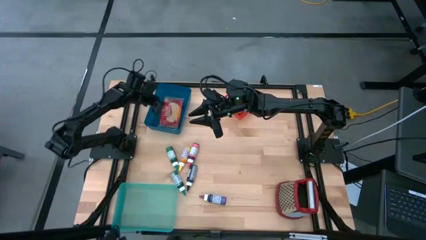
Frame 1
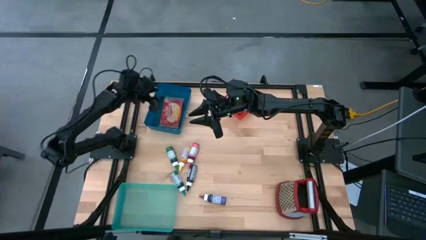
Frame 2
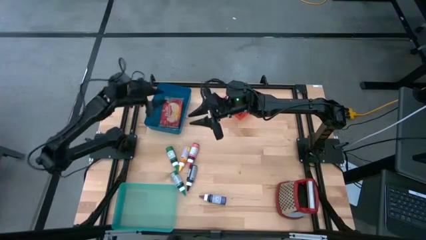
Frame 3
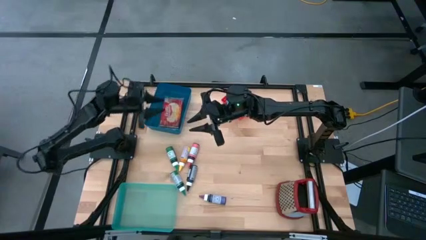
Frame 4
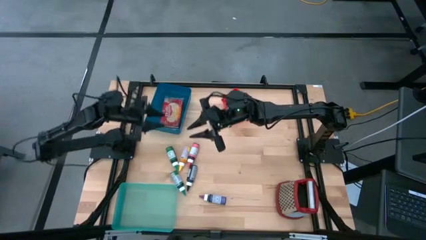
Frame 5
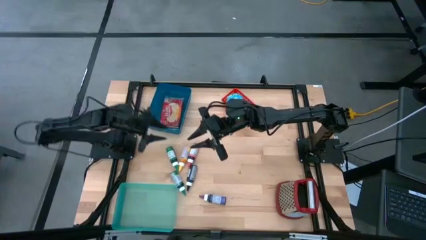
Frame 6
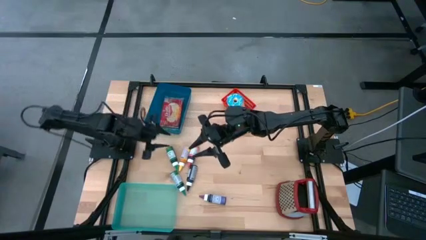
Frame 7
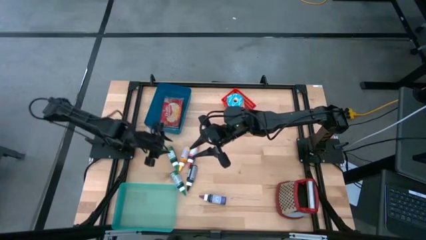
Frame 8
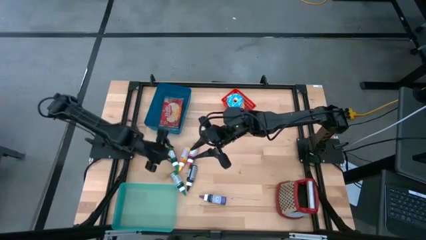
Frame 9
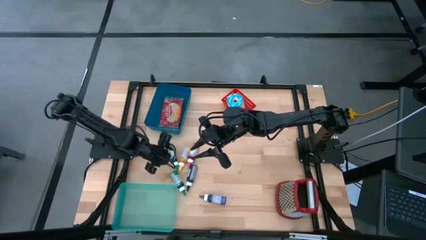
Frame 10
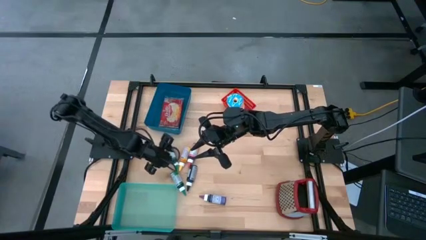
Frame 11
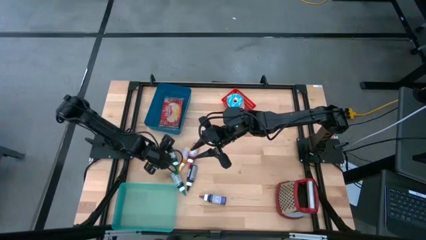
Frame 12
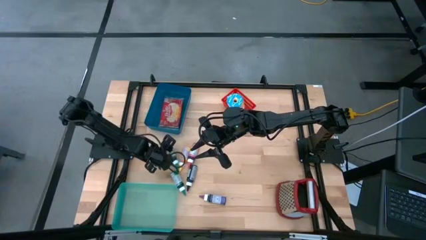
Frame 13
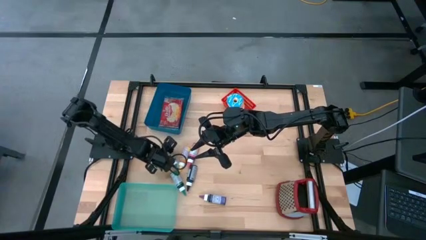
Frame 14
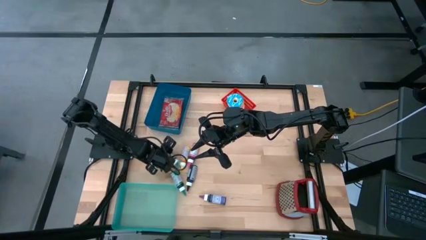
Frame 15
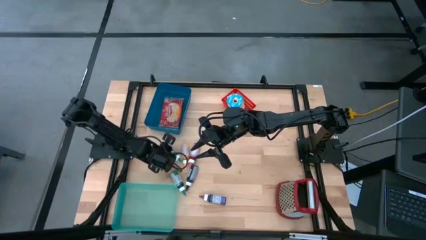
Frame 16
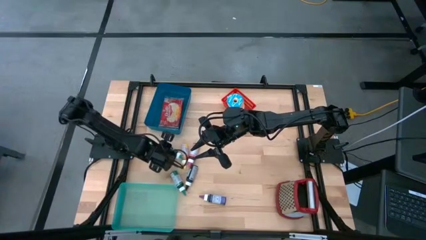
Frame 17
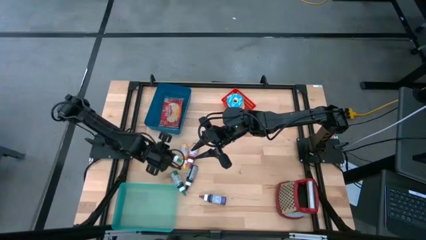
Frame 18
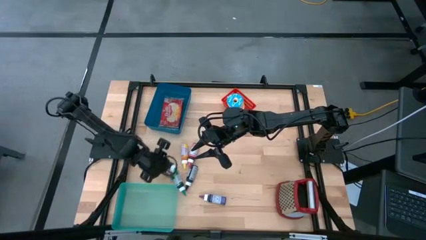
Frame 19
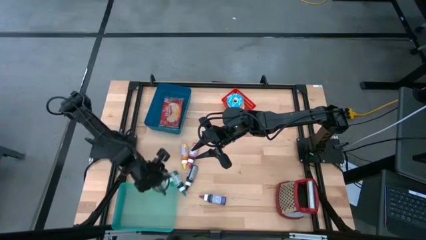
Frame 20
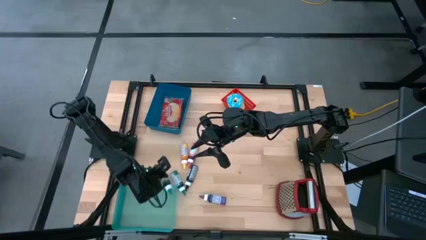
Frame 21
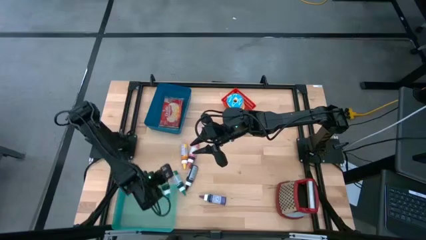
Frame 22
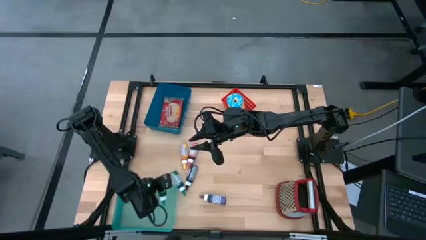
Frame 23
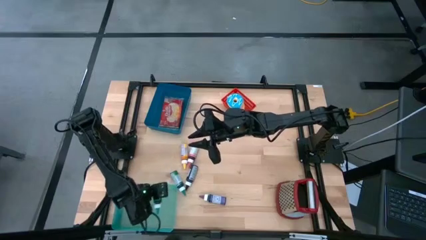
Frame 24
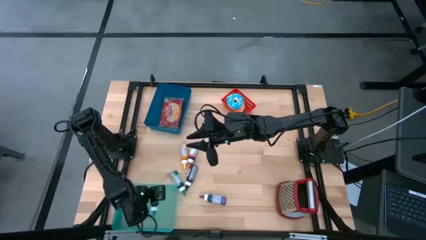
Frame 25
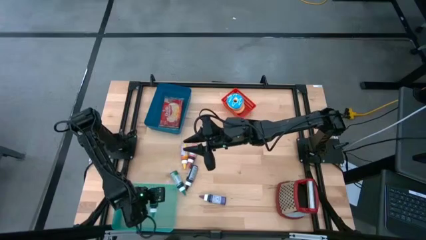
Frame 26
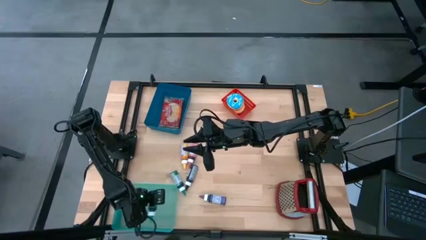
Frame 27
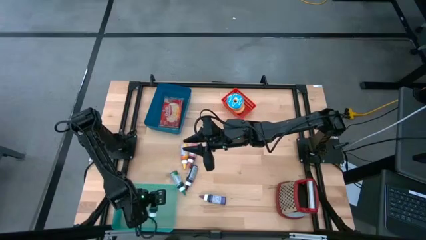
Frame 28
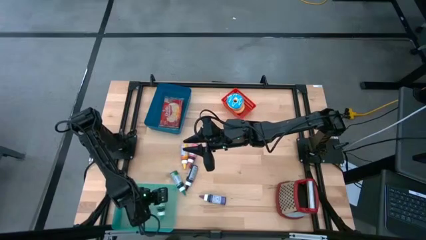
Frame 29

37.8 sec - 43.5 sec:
Put the green food coloring bottle into the green bin

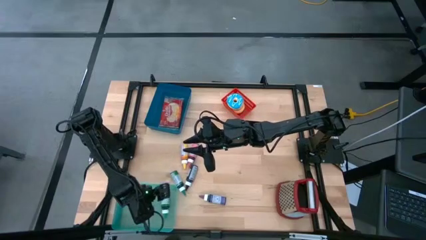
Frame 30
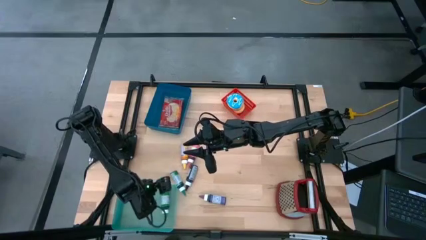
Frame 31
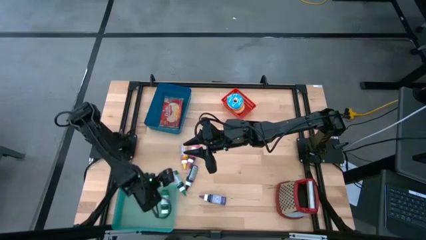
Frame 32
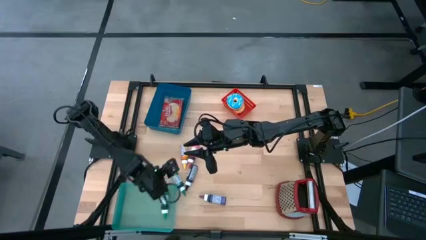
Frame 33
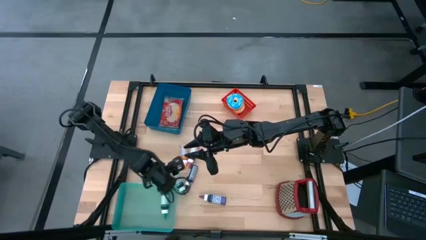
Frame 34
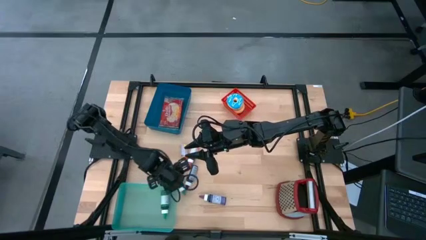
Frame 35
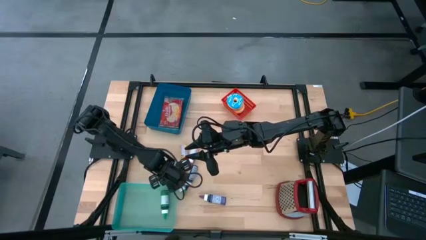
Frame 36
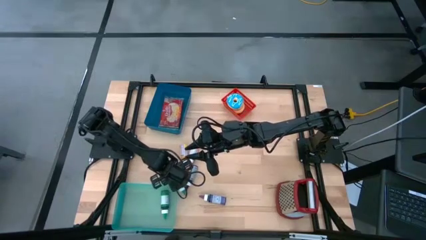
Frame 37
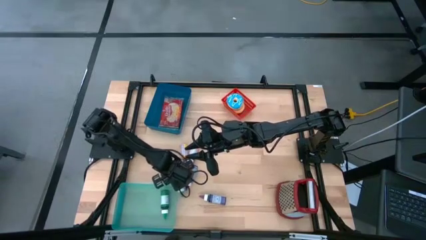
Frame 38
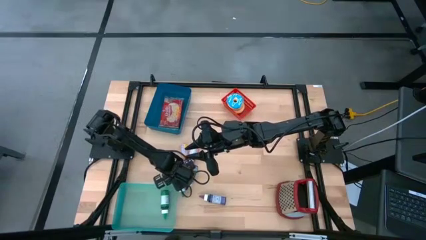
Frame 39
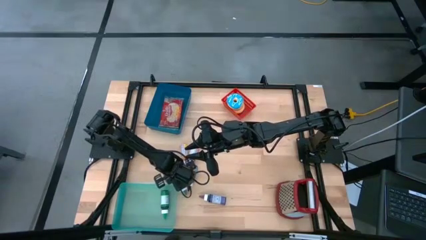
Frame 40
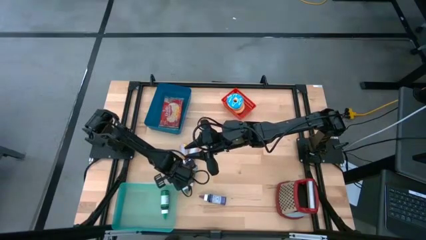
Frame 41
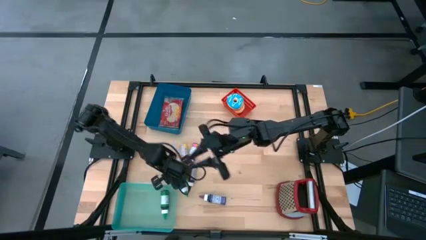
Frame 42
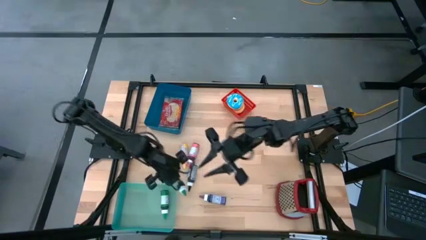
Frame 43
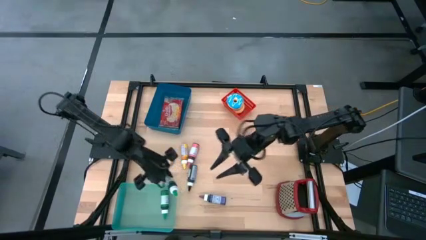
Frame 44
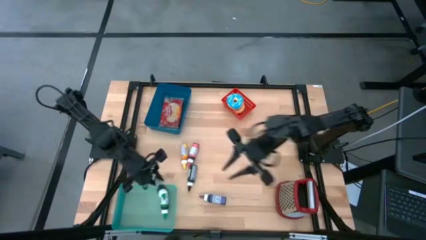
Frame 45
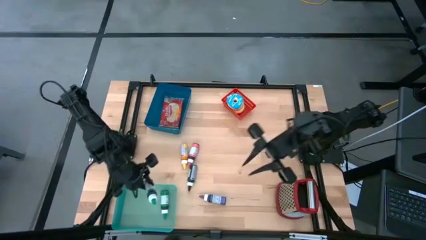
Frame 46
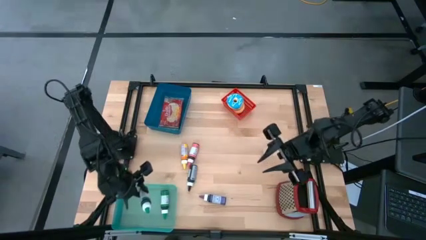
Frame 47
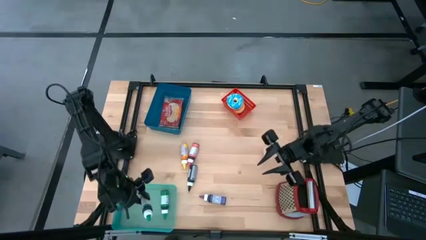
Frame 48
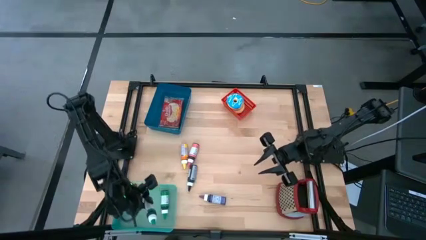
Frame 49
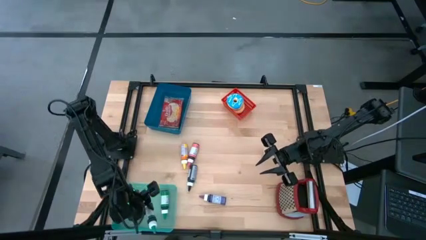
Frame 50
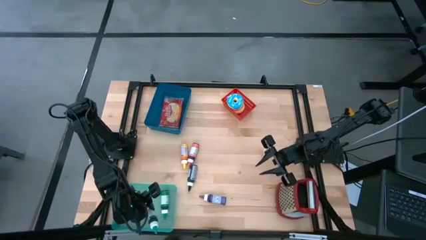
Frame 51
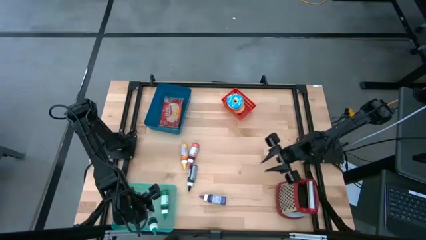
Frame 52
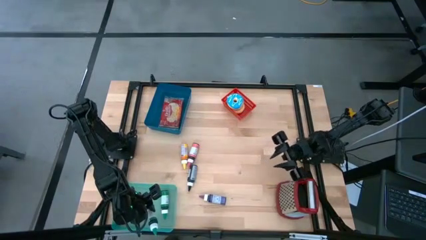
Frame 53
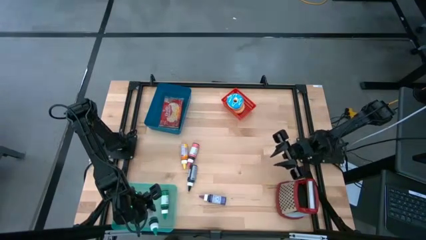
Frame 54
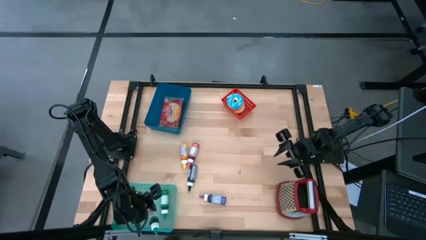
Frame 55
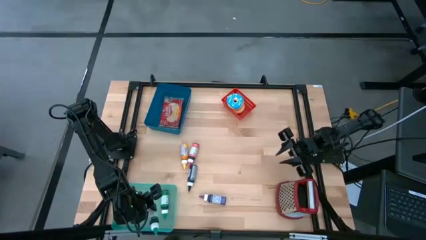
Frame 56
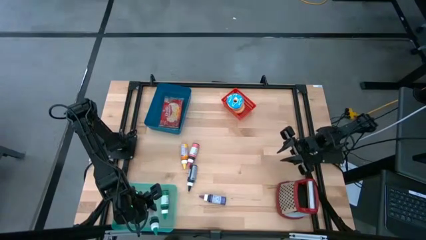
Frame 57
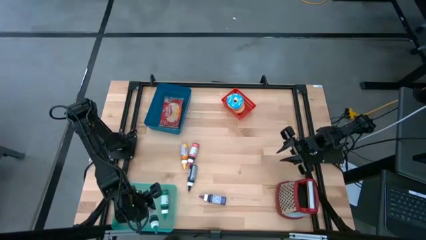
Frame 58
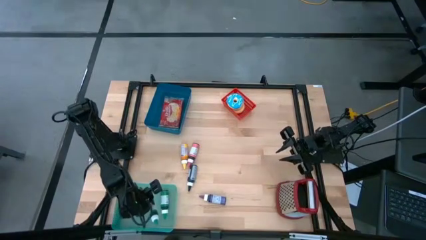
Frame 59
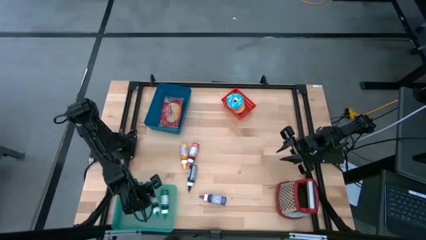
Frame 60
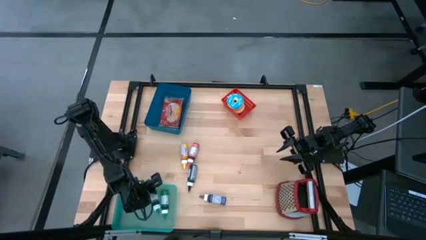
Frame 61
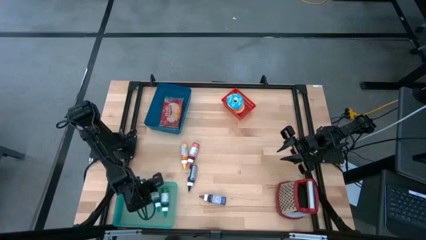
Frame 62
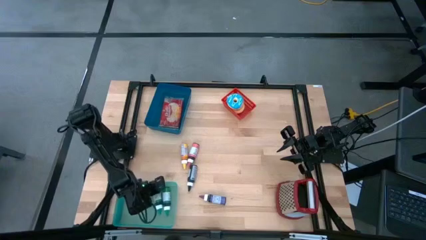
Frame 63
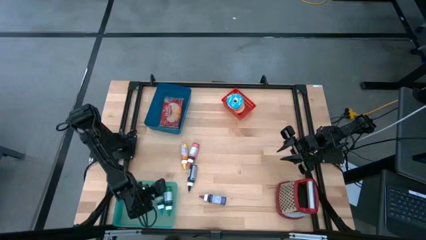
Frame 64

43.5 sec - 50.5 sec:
Put the green food coloring bottle into the green bin

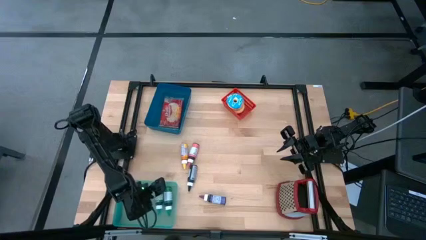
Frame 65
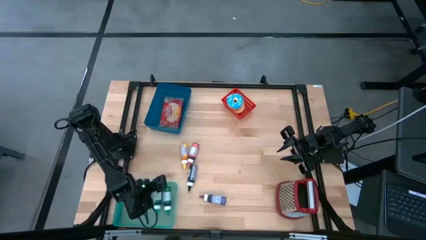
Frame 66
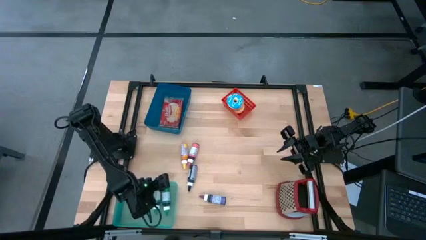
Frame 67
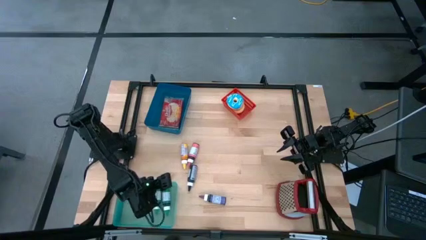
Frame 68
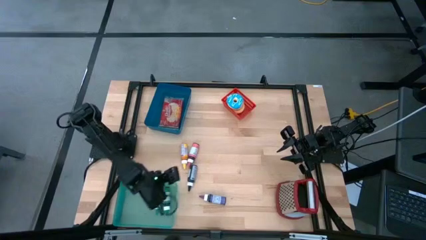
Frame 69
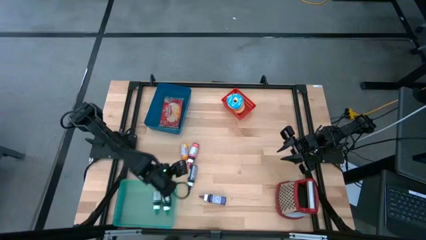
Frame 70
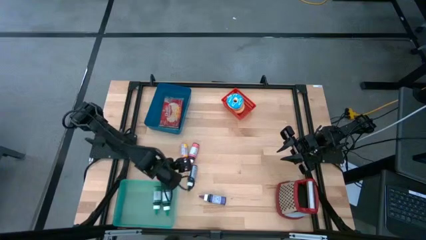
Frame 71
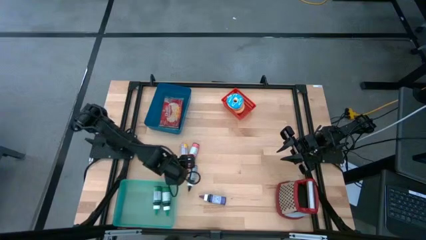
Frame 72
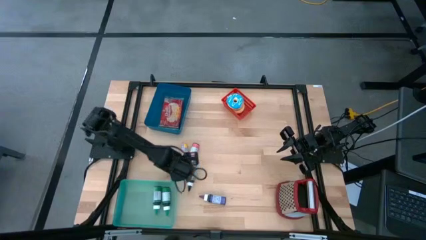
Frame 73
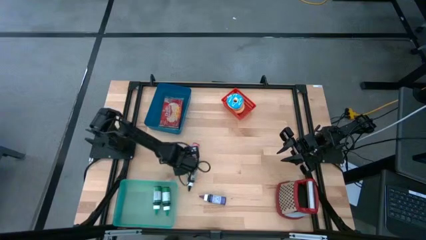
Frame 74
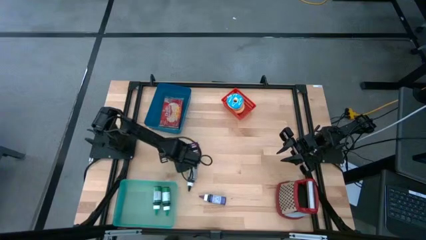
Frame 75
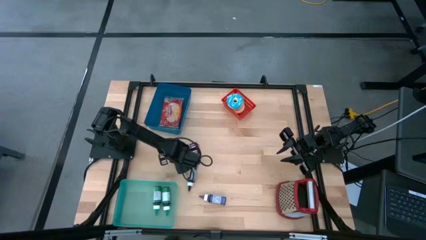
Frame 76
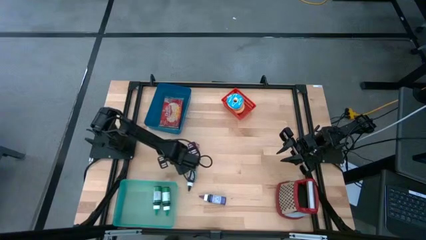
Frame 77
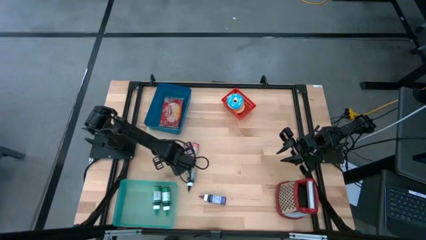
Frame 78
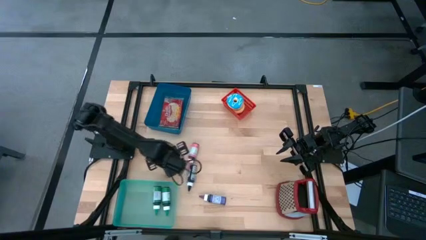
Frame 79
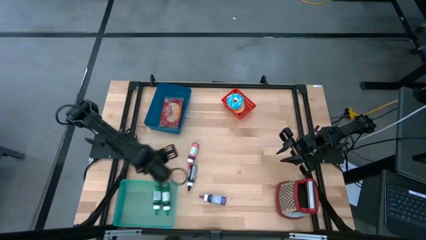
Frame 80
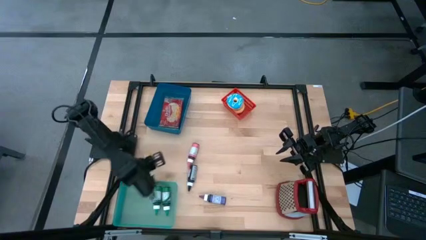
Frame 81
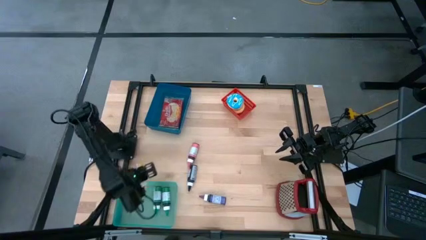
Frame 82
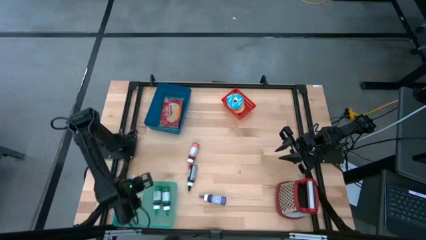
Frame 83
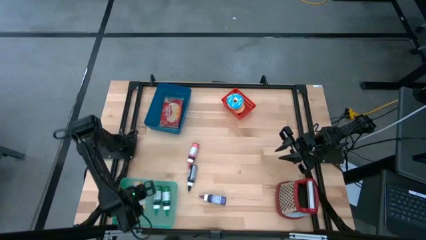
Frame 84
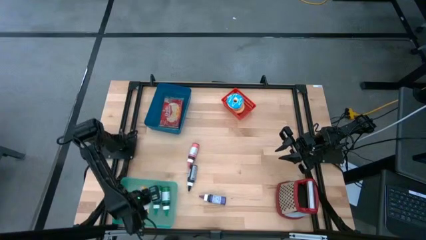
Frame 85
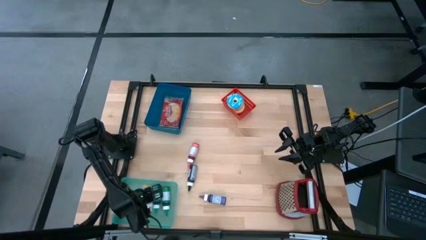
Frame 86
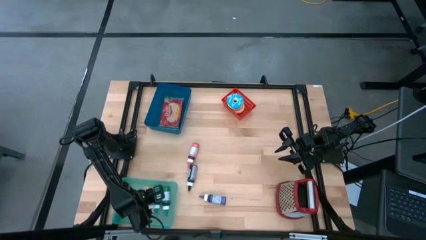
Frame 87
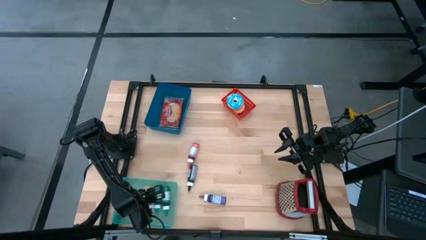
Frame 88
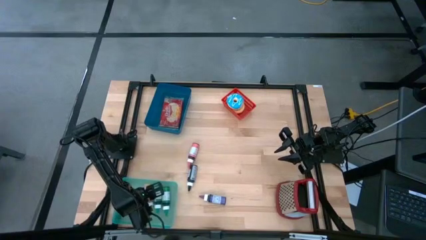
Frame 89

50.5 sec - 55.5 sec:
Put the yellow food coloring bottle into the green bin
